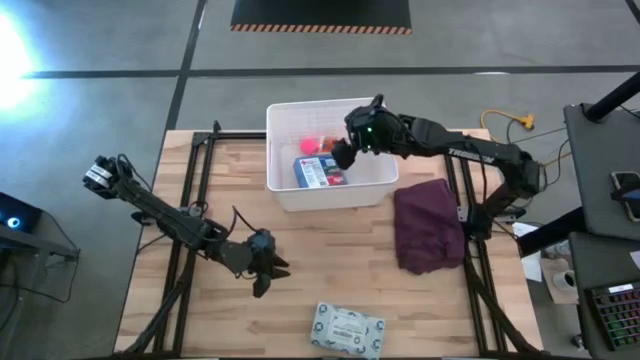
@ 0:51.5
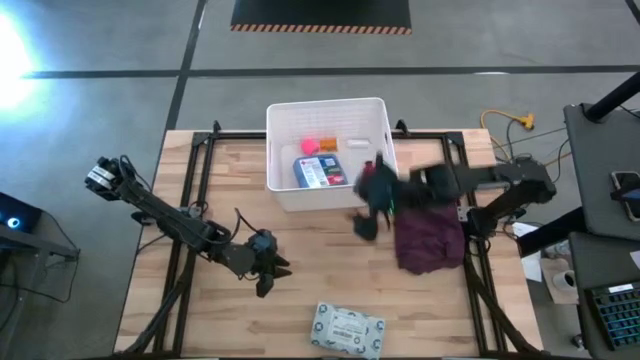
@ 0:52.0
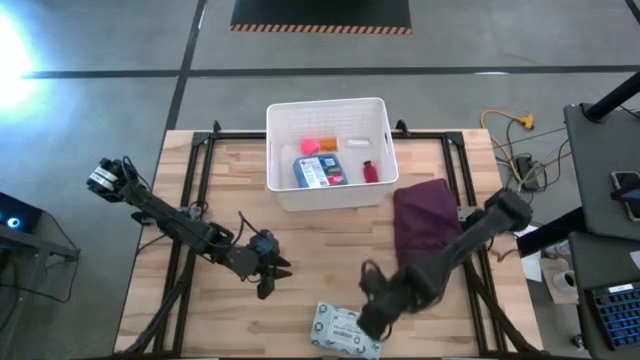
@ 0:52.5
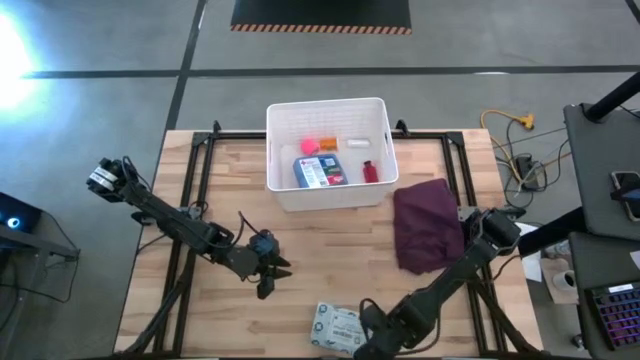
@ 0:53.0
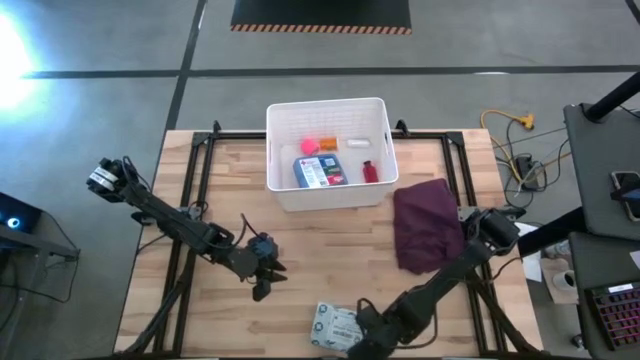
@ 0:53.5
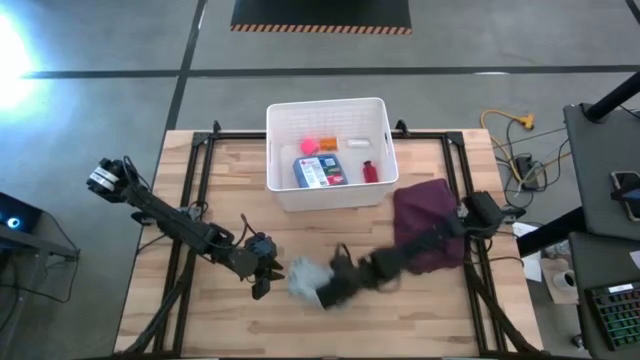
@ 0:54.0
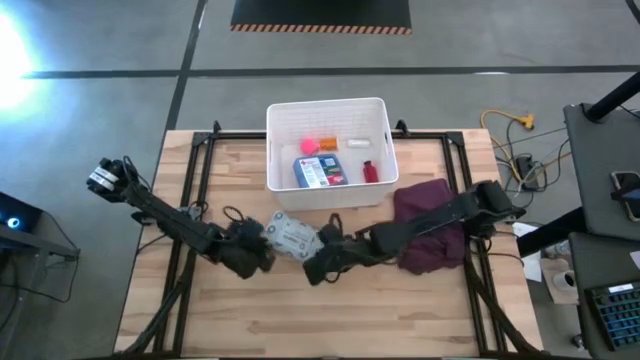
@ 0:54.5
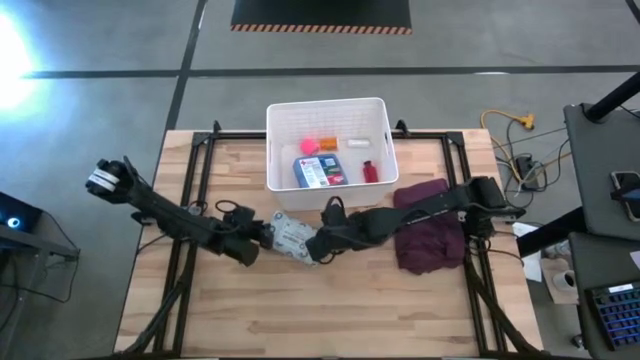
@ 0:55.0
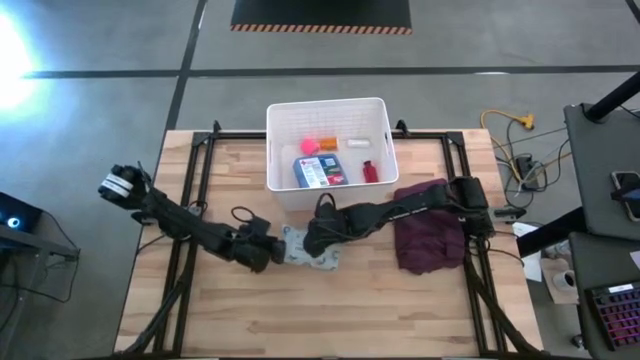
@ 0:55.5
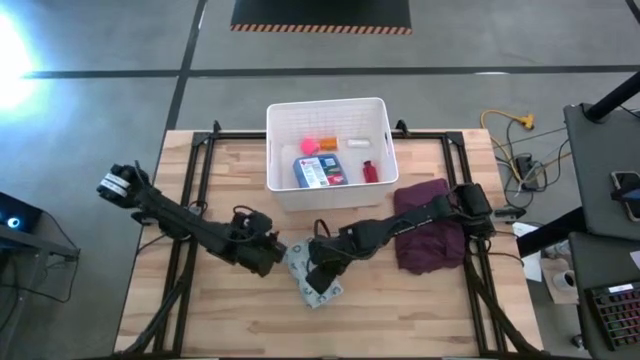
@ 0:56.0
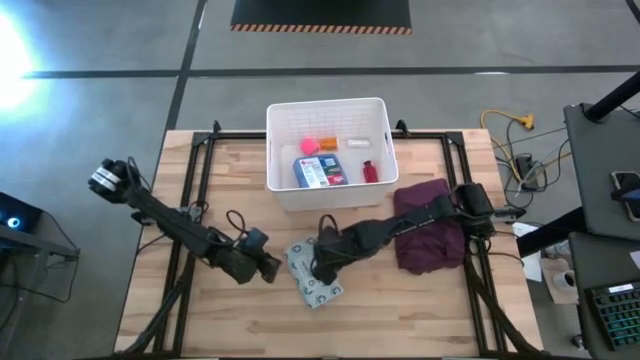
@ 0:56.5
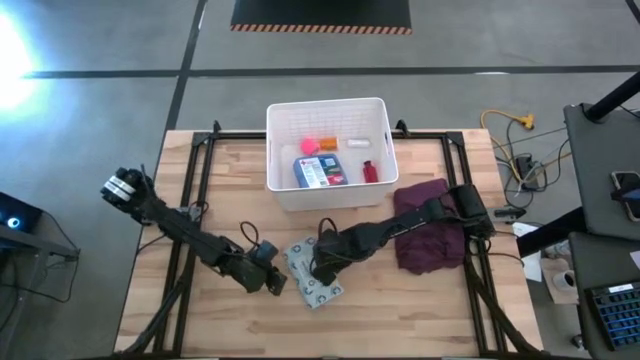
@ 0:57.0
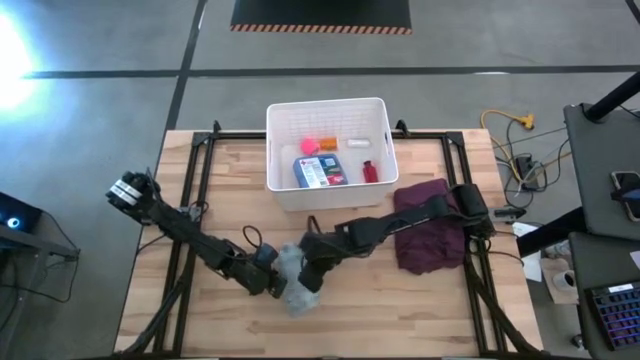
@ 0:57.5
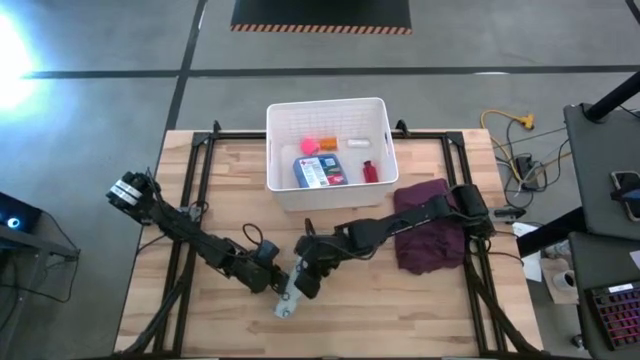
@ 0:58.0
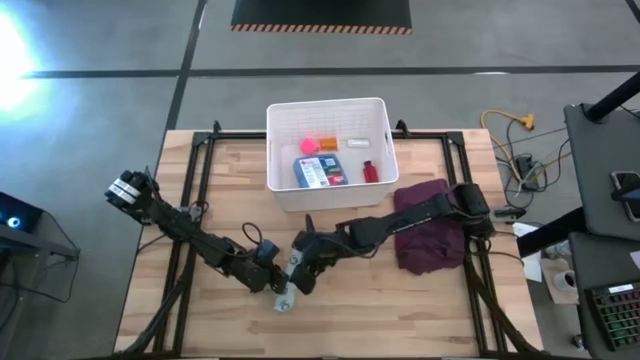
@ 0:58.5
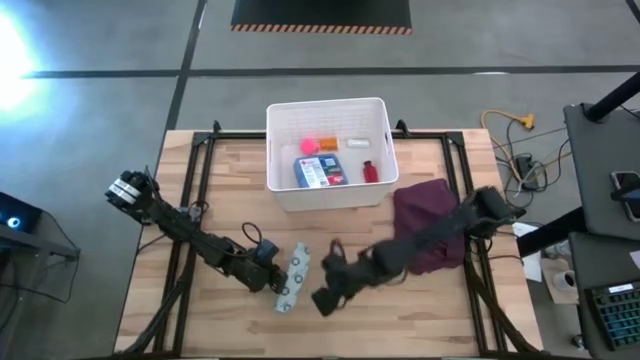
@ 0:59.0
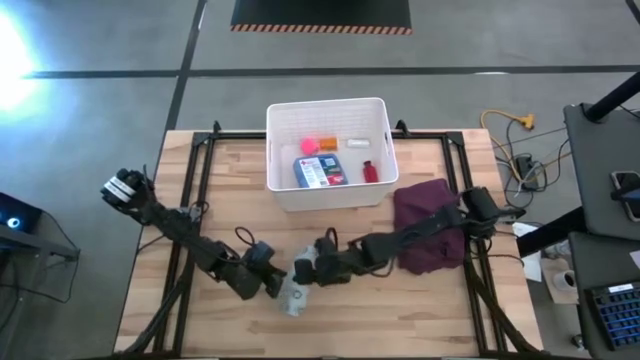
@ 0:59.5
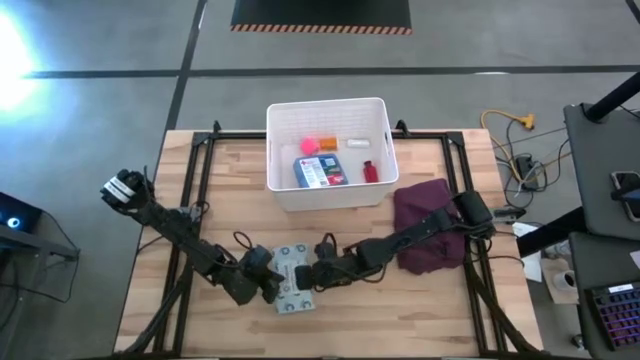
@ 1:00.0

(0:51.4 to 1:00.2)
Task: Pick & place medical supplies in basket/bin
Put the light blue mailer bag into the white bin

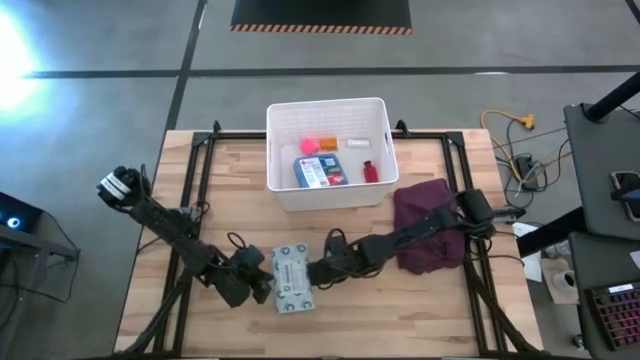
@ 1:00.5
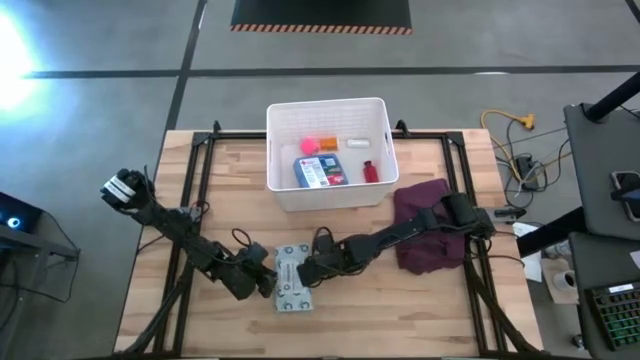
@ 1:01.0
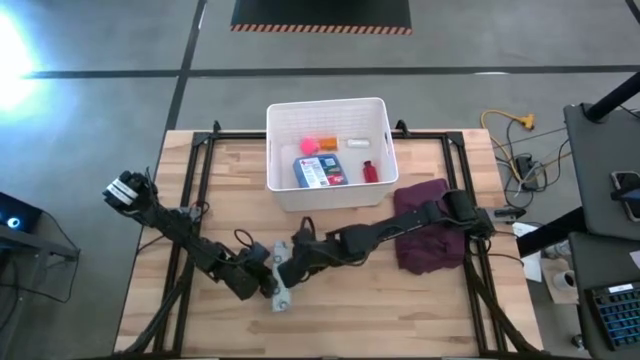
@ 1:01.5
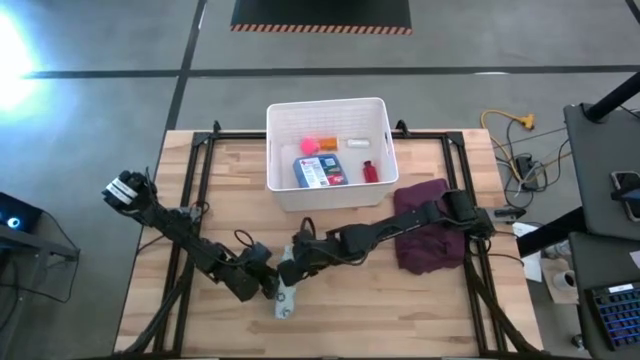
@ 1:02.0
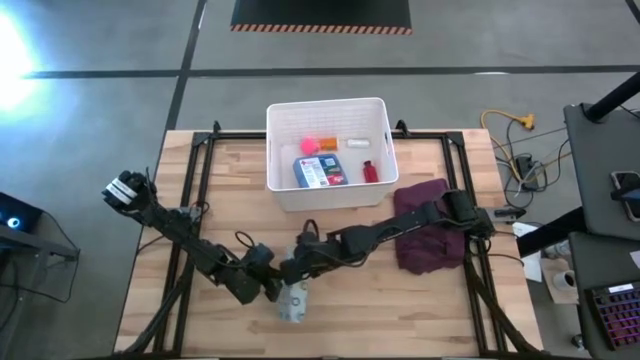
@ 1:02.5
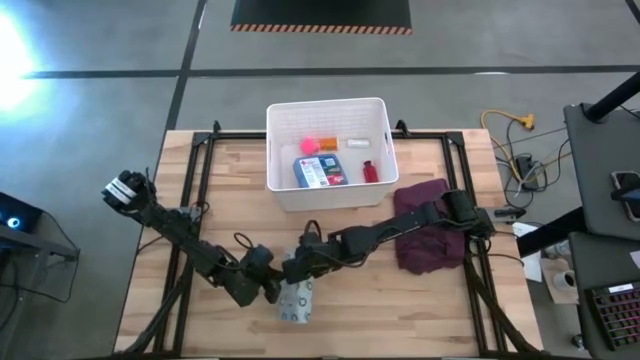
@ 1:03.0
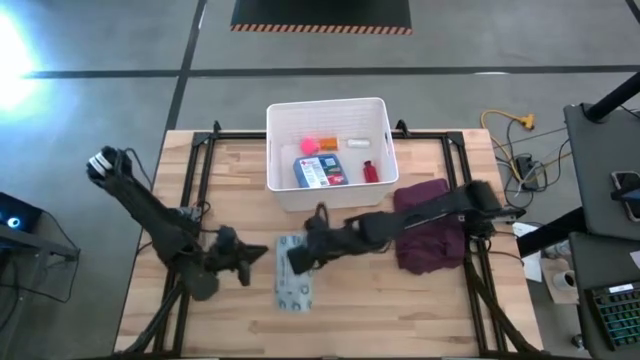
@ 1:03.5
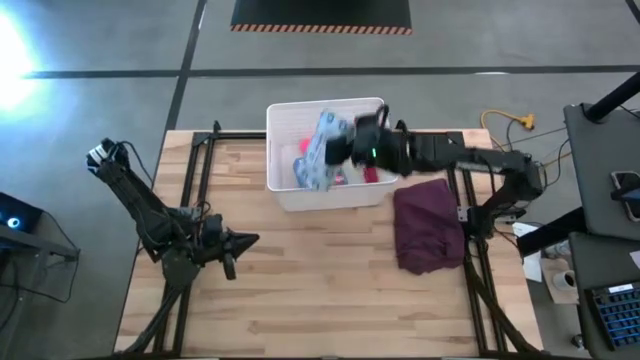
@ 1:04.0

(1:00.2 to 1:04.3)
Put the light blue mailer bag into the white bin

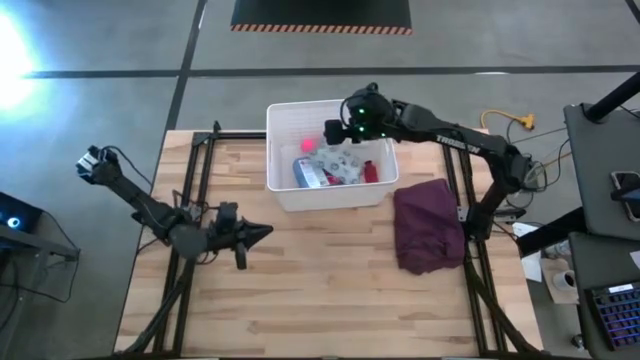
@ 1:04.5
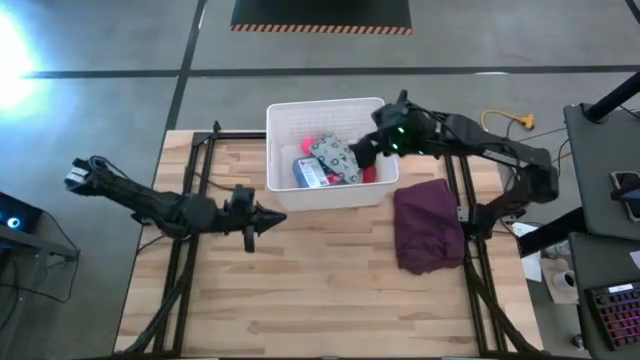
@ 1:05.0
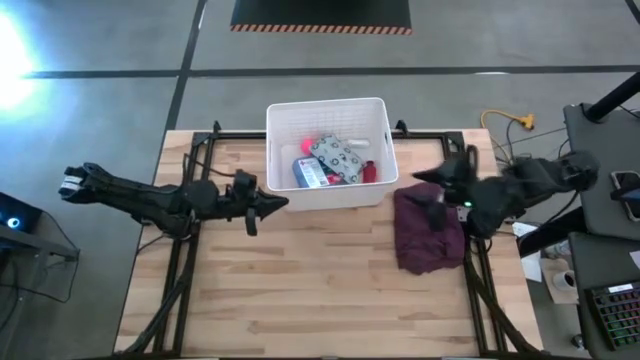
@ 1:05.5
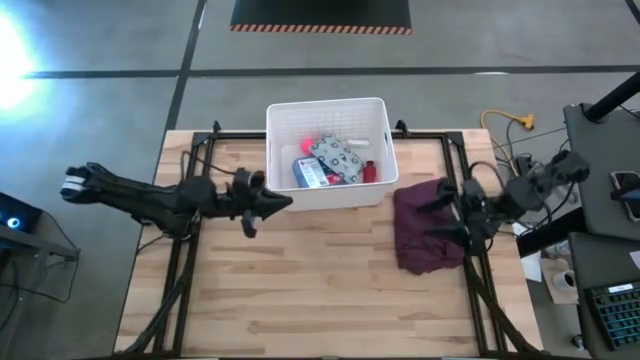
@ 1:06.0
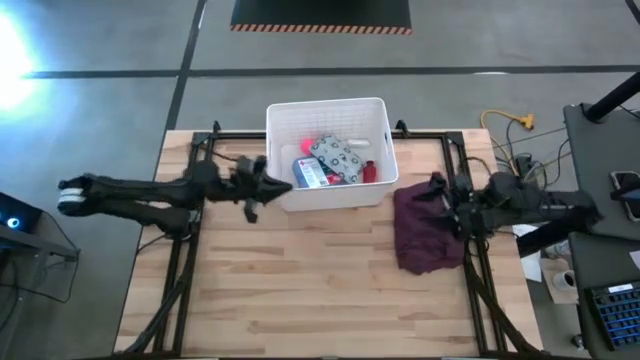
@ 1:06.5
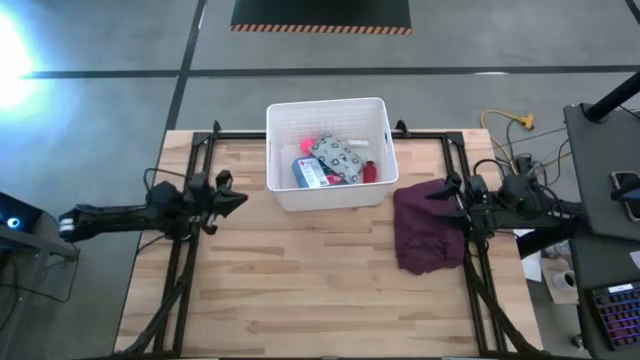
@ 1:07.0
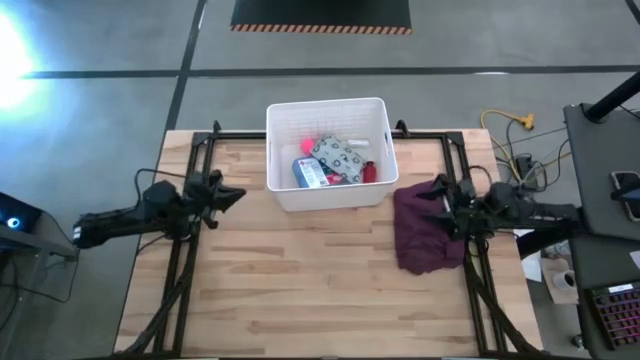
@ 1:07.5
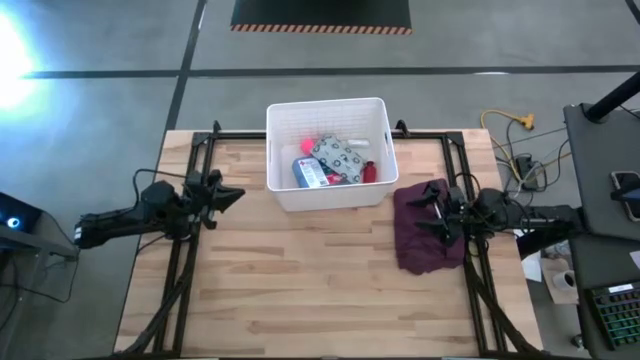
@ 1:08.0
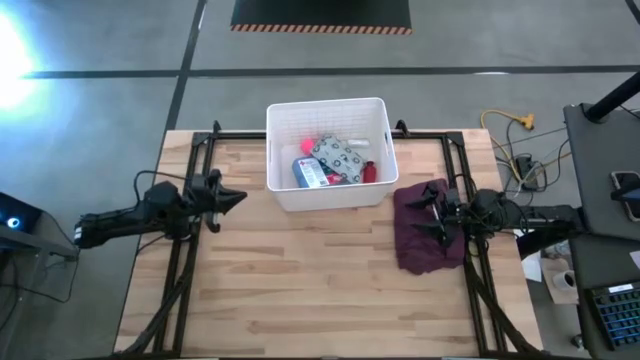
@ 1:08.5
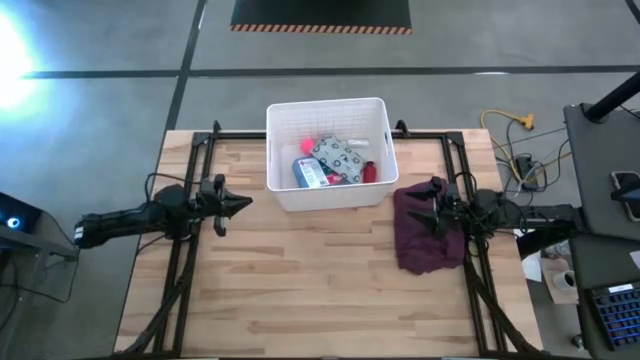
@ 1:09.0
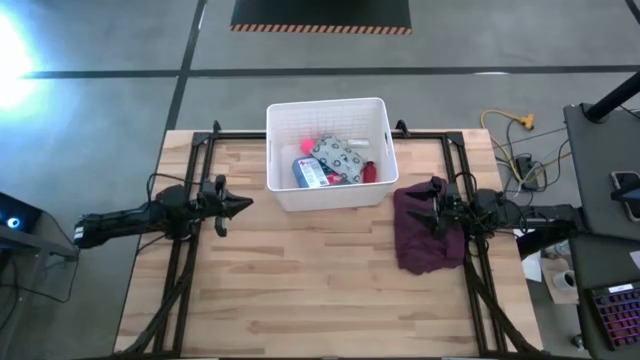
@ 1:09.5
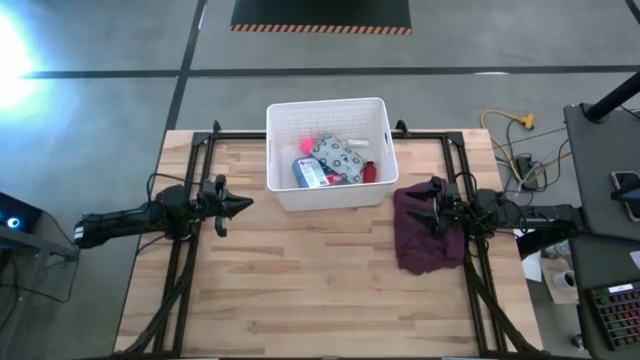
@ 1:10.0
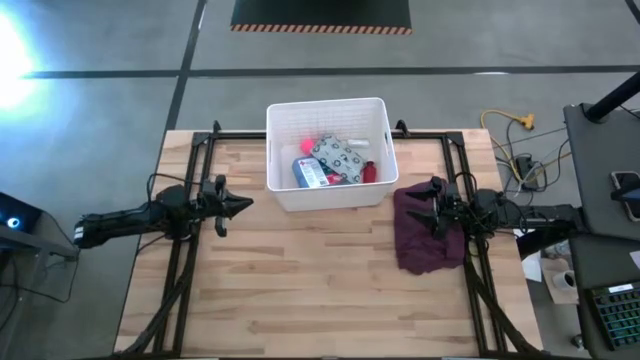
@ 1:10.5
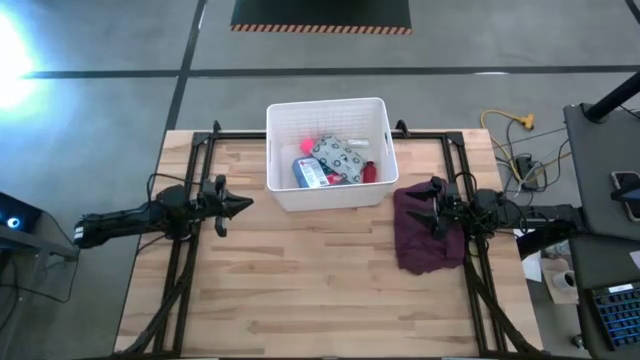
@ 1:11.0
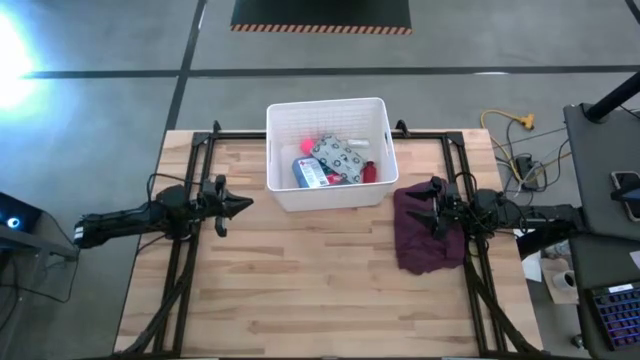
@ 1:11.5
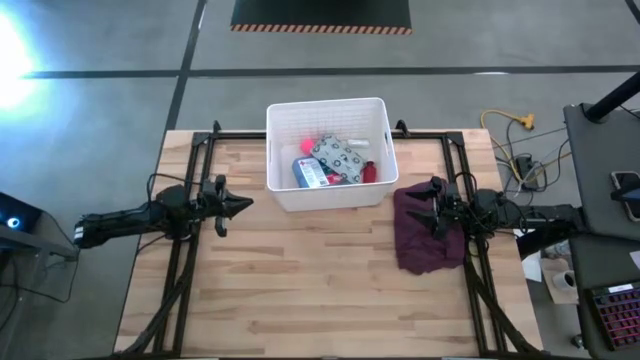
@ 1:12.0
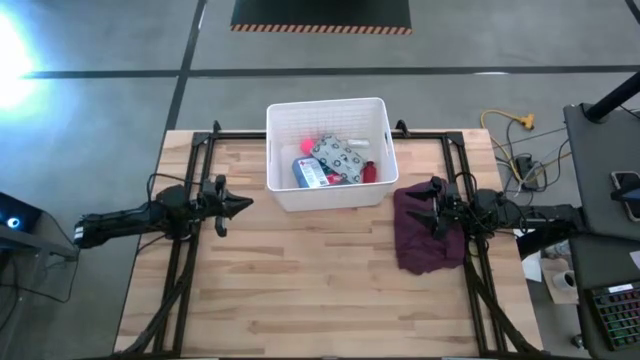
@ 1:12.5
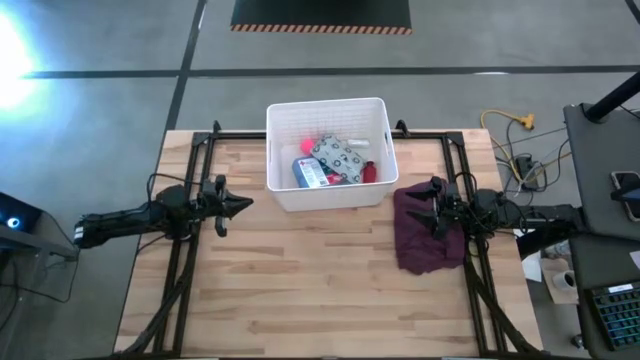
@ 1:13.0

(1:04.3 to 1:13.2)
Return to Home Position
